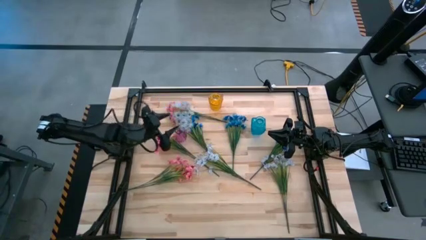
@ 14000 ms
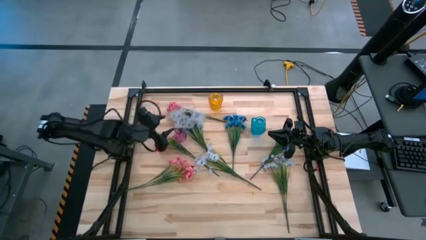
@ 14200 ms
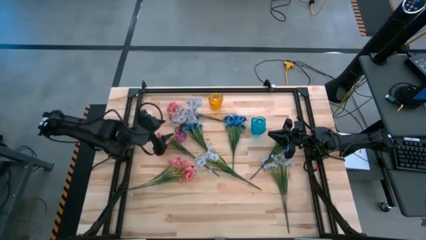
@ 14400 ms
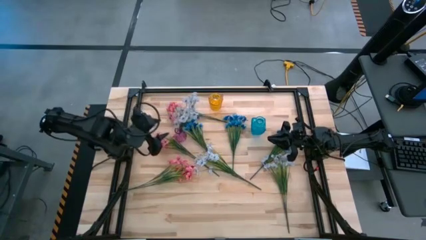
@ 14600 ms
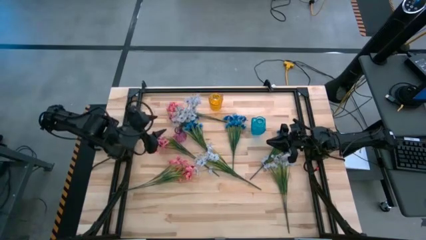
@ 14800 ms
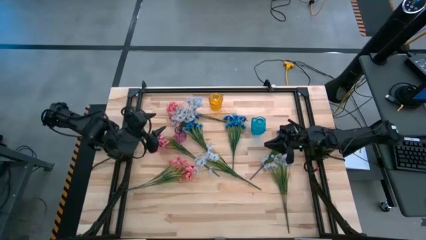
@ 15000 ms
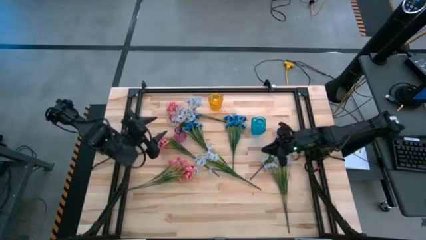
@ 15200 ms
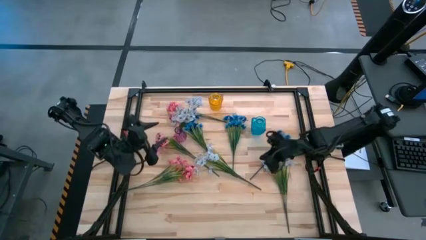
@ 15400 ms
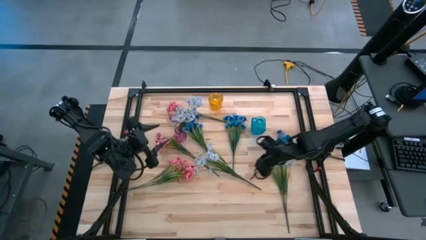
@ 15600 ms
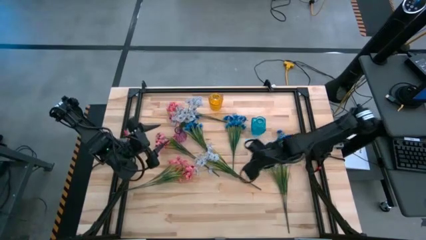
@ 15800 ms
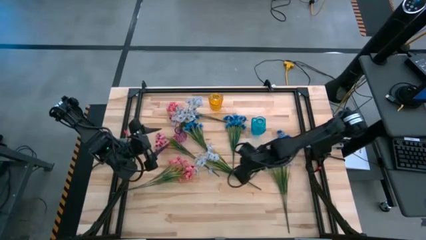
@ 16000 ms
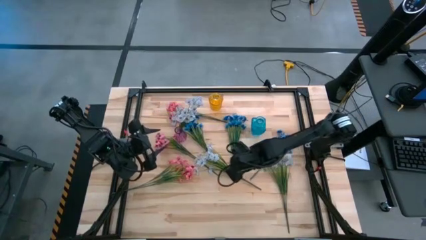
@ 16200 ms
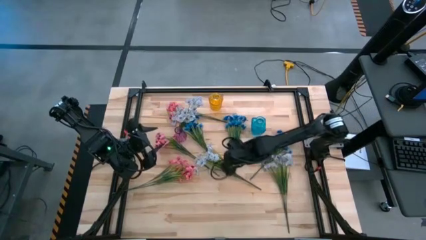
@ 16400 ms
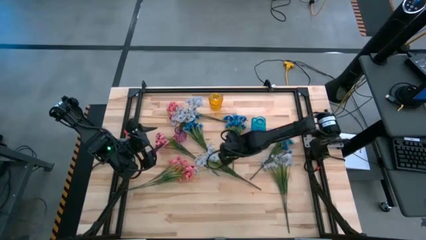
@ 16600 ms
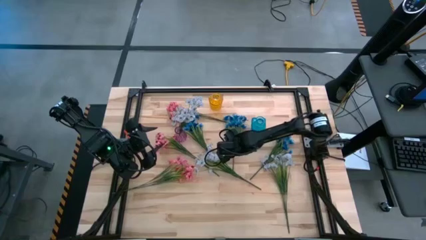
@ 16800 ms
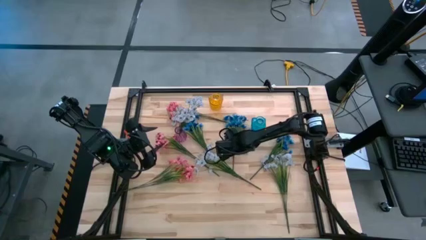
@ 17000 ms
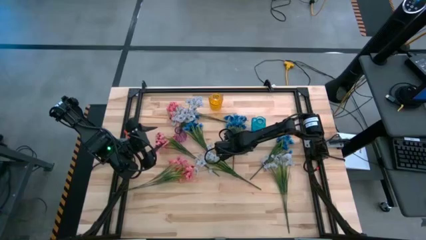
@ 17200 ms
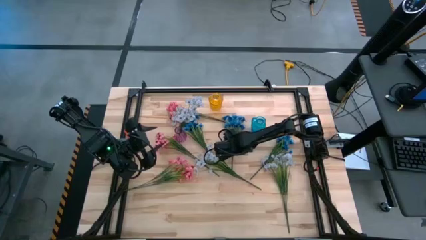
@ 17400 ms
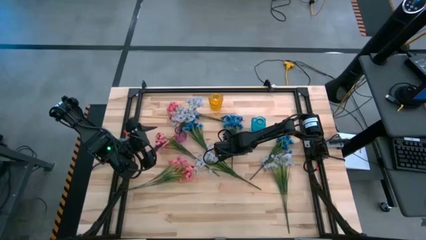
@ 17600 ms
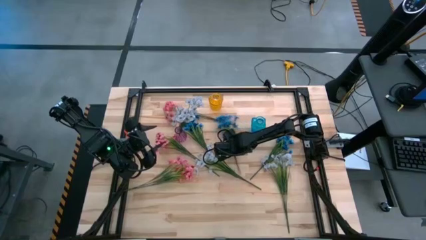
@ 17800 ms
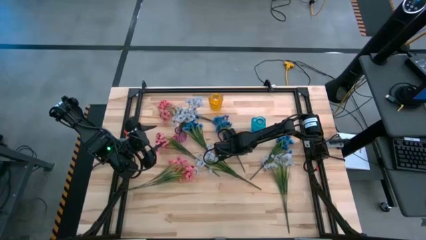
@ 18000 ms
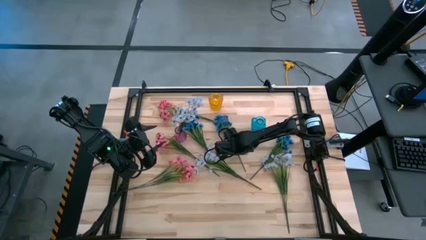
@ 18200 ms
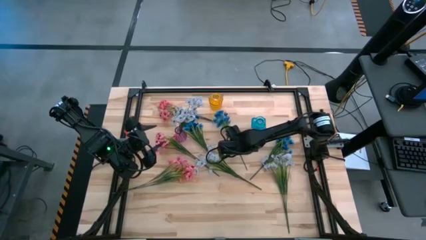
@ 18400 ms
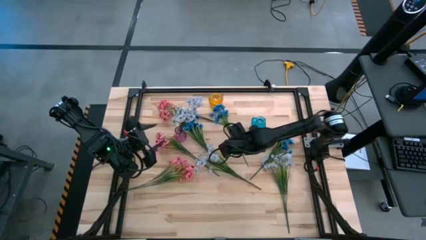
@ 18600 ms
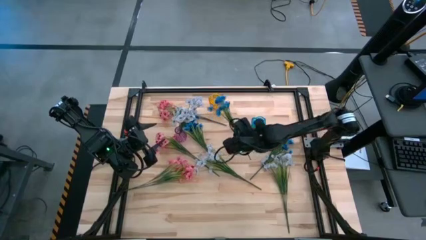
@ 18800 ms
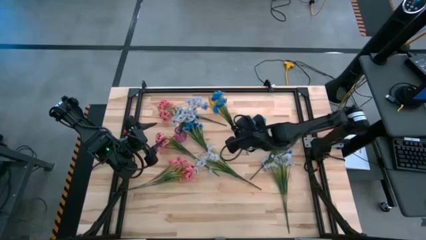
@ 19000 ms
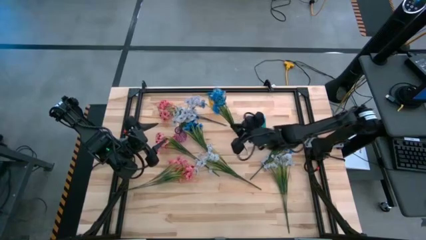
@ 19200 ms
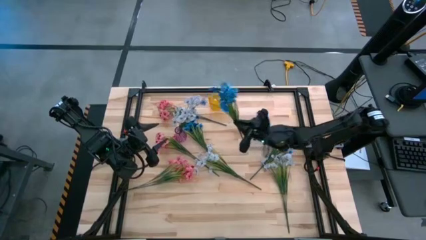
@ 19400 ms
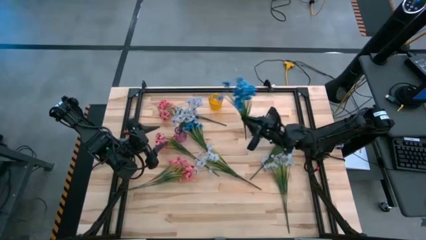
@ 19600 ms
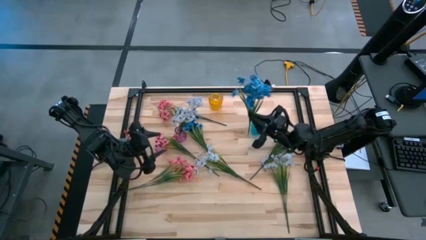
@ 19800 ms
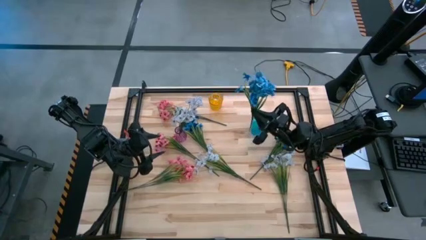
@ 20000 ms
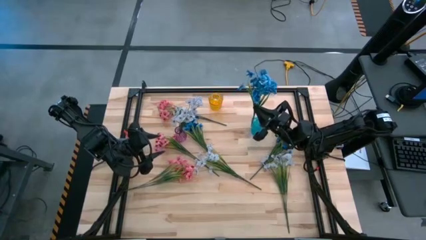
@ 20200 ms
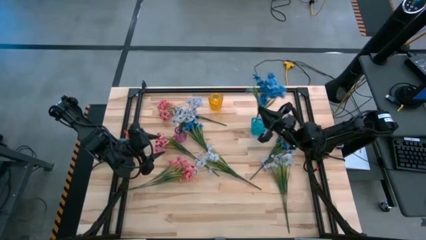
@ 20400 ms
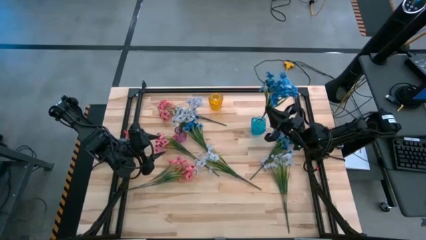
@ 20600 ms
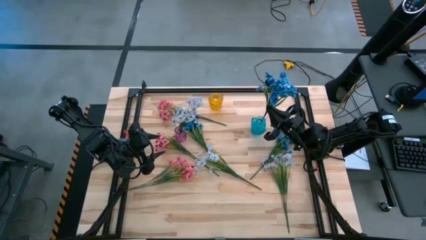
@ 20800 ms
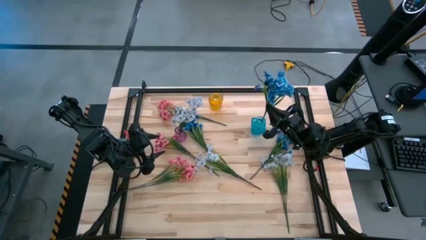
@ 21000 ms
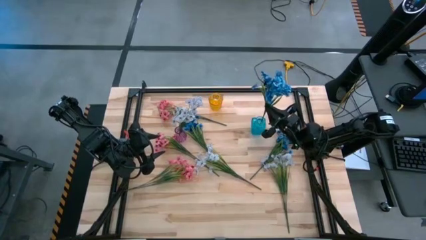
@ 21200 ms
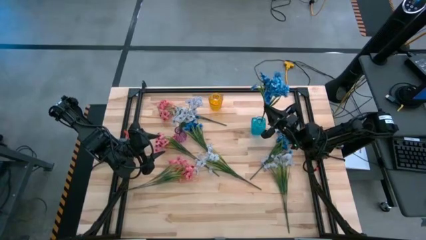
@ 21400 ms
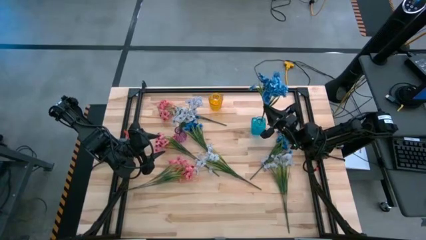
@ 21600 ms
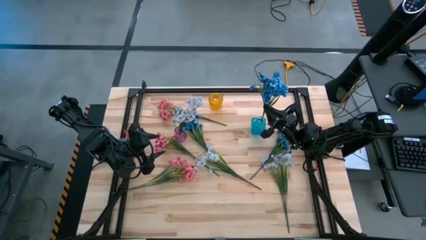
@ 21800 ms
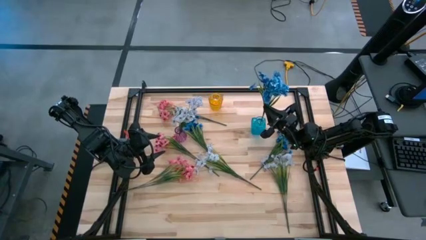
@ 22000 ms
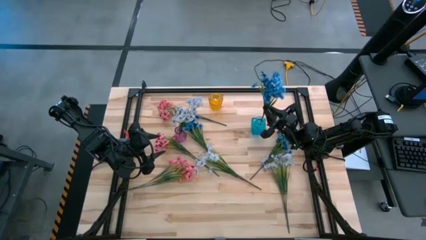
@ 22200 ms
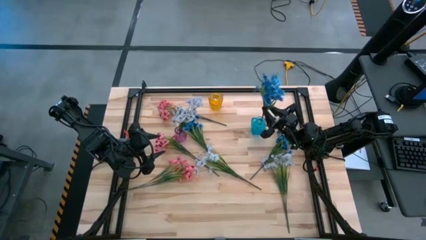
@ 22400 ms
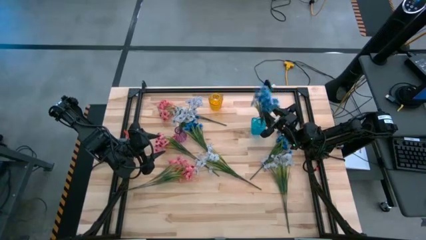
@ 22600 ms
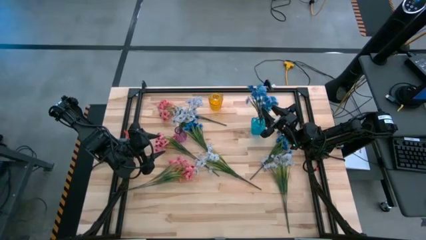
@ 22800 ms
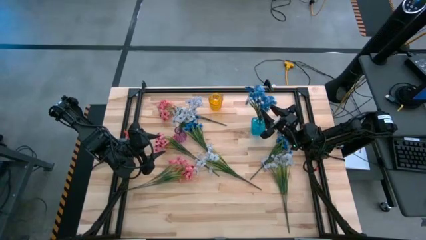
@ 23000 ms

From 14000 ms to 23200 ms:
Task: Sort flowers into vase by color
Put the middle blue flowers into the blue vase

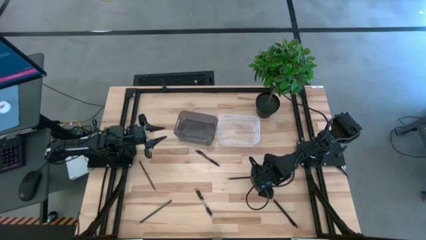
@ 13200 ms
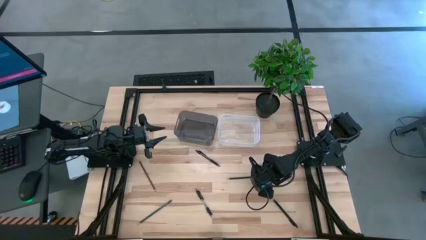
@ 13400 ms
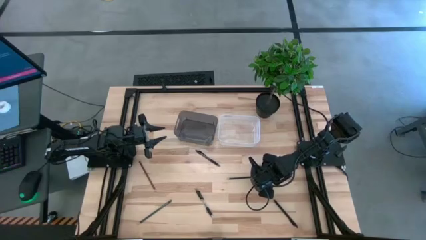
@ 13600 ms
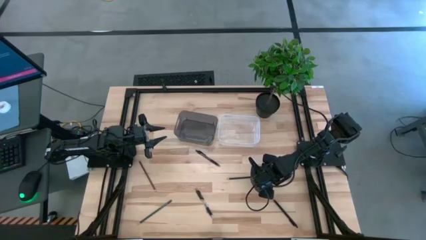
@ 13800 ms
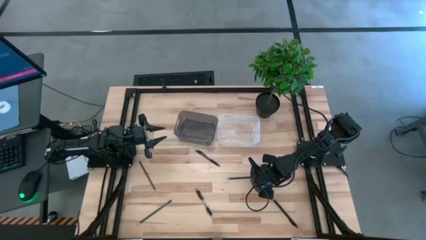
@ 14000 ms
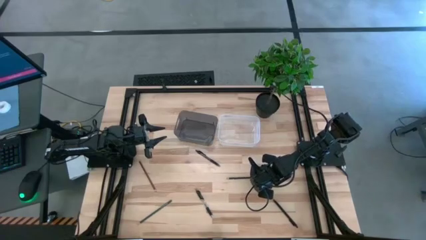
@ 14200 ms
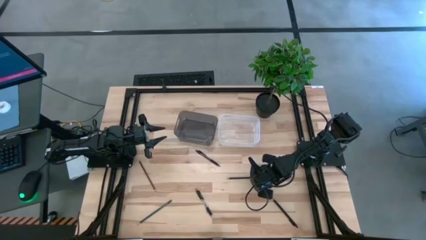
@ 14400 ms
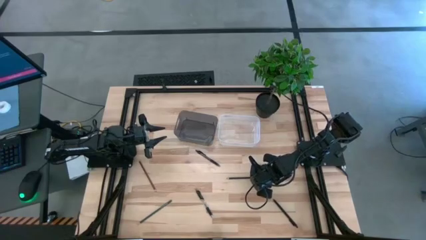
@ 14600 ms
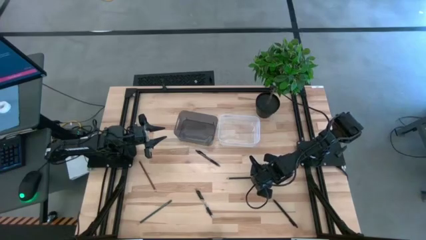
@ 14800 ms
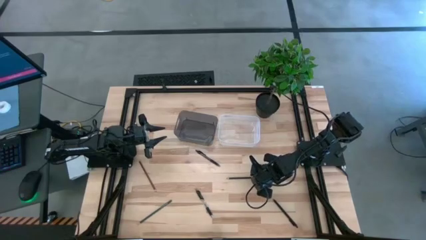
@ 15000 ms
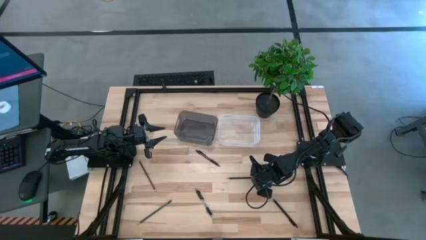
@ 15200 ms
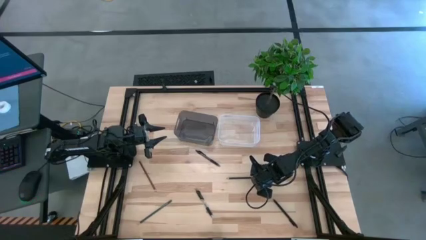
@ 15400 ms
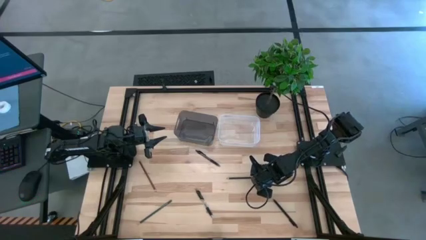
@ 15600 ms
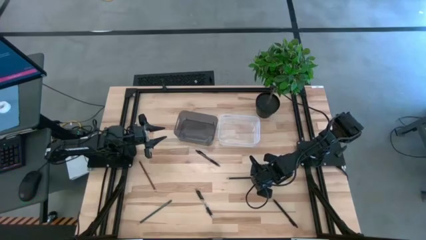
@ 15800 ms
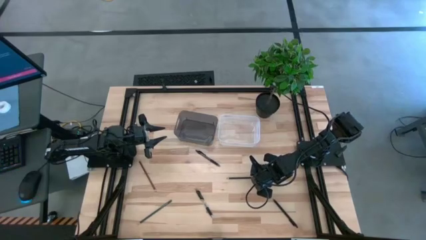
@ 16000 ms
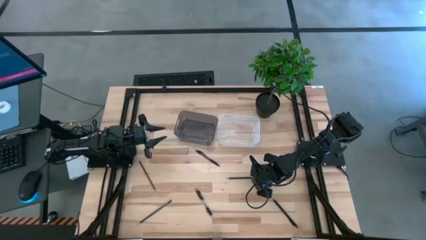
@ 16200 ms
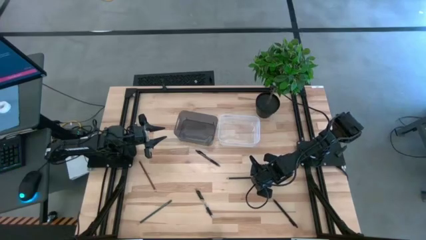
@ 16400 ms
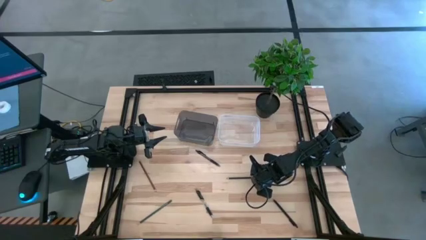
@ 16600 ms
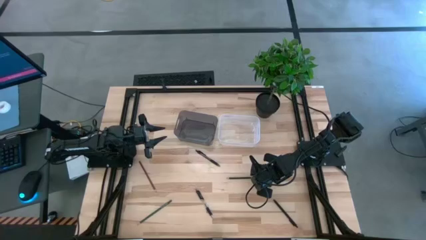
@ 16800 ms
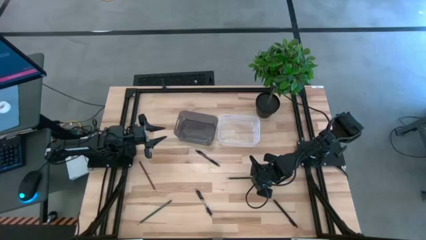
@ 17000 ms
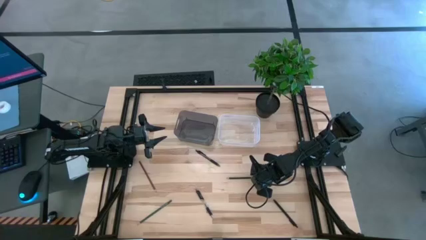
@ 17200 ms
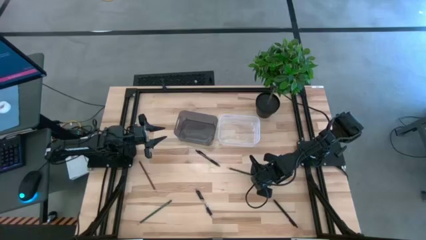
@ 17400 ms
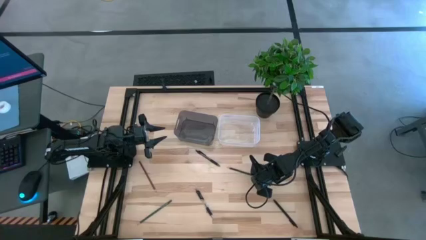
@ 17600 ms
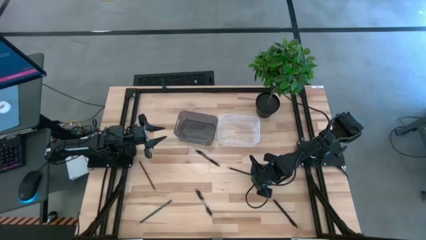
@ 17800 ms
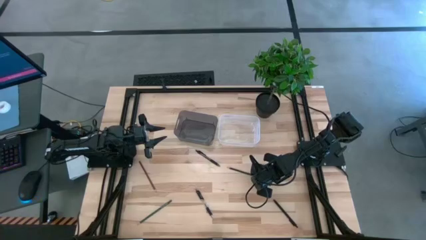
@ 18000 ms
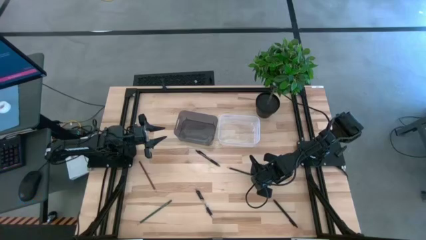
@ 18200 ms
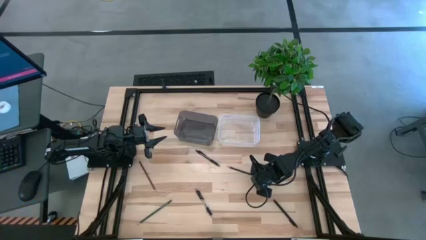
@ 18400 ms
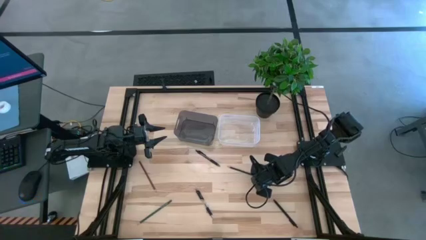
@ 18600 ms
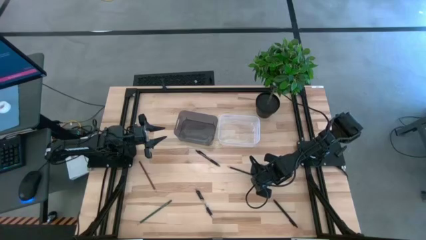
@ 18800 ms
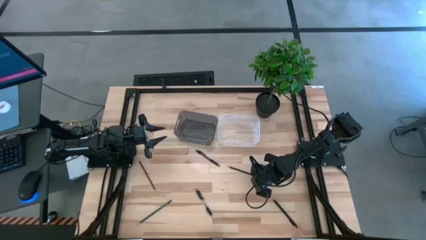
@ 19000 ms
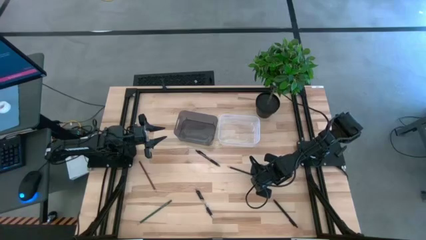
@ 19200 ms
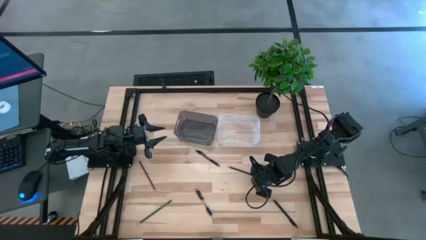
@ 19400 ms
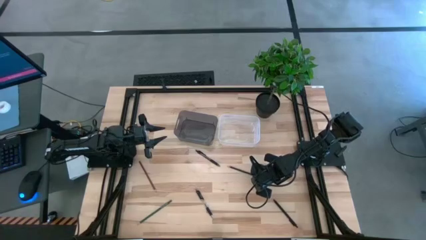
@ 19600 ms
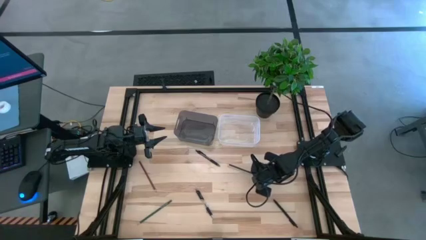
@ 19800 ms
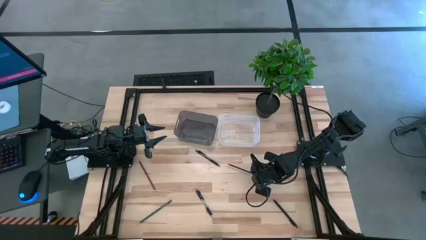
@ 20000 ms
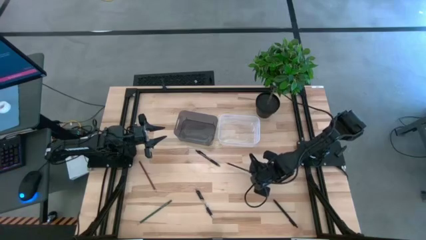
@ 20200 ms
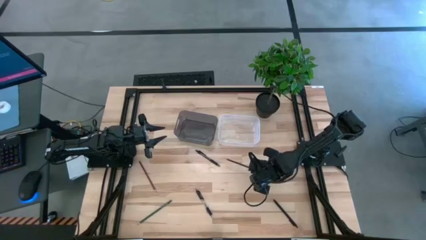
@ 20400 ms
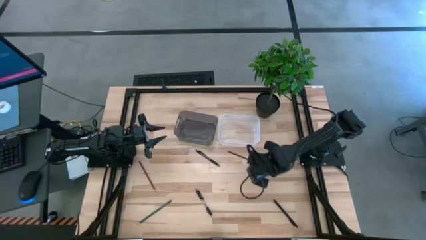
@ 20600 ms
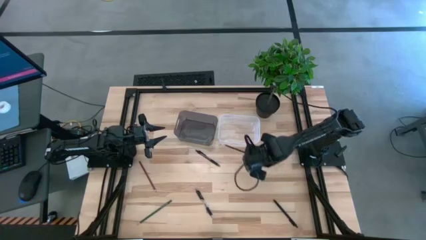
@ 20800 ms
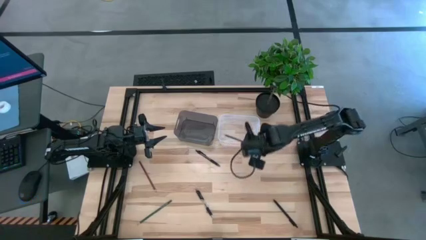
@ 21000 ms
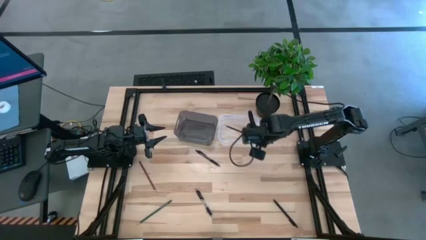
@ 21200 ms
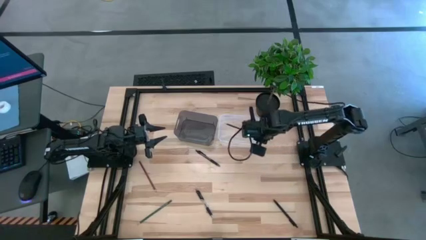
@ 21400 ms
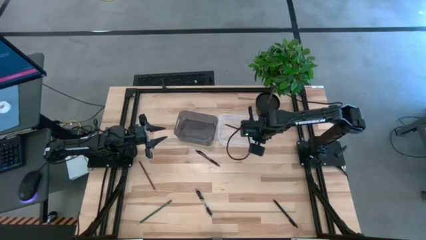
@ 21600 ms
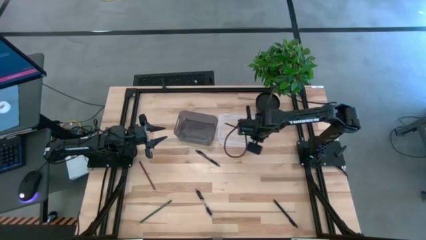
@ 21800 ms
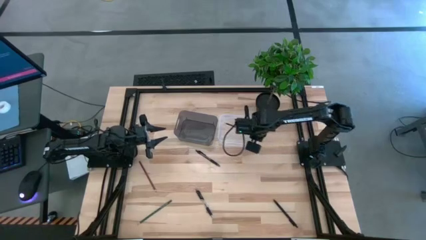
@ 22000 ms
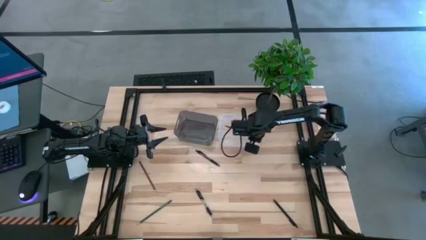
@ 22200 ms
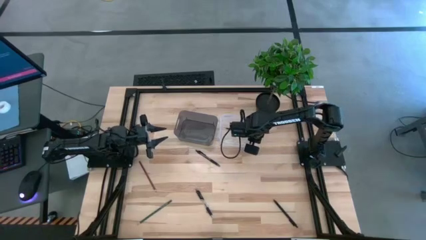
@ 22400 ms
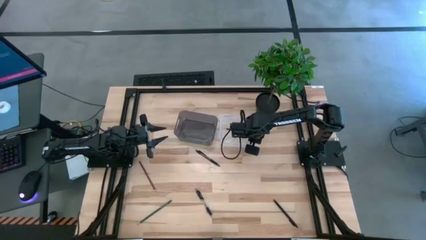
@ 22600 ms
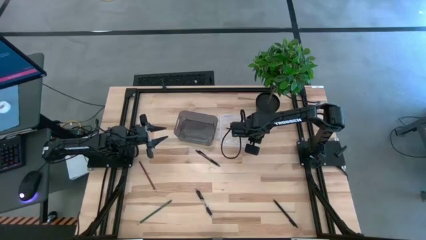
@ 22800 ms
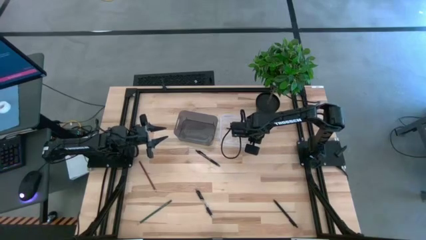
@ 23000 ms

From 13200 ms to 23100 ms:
Task: Sort pens & pencils
Put the black colored pencil into the transparent bin
